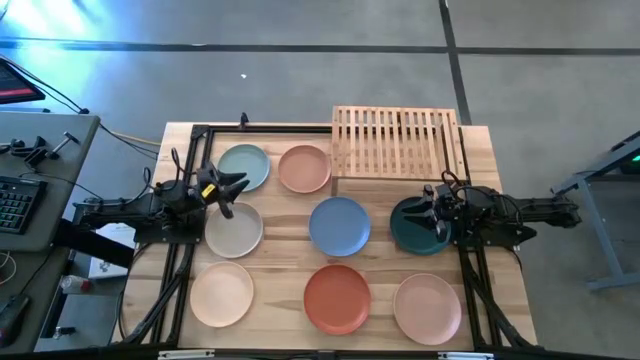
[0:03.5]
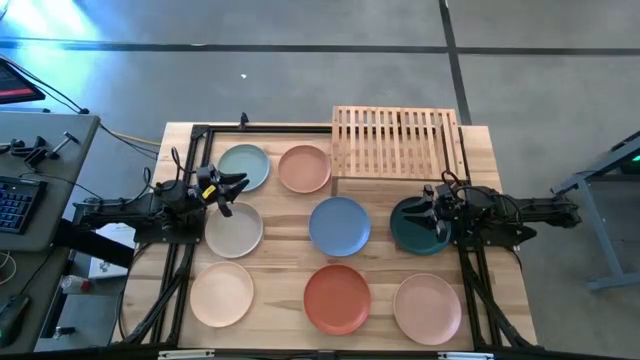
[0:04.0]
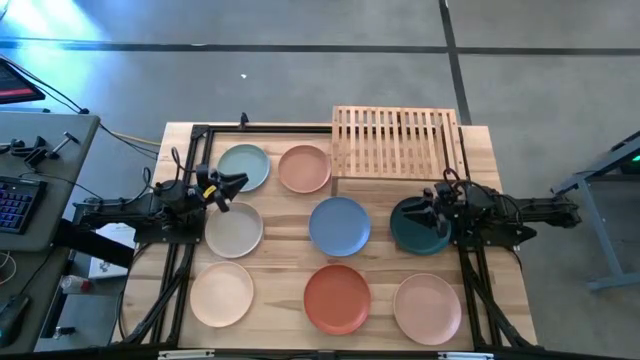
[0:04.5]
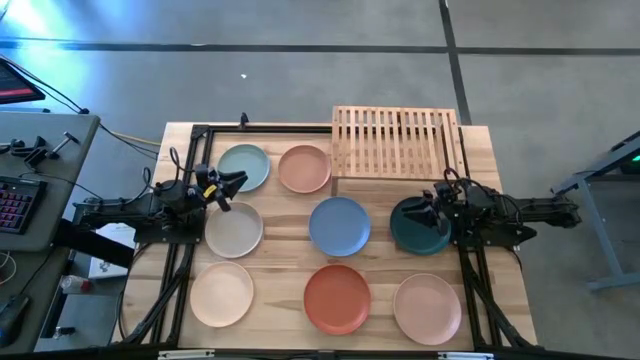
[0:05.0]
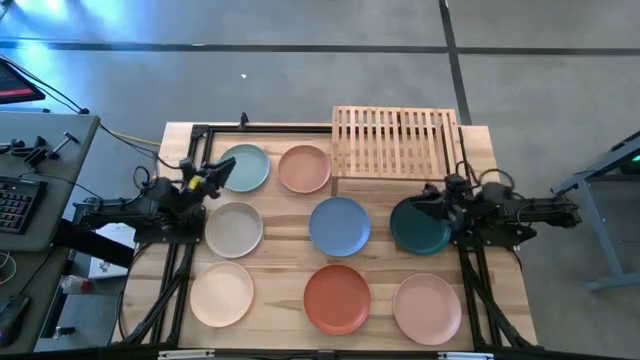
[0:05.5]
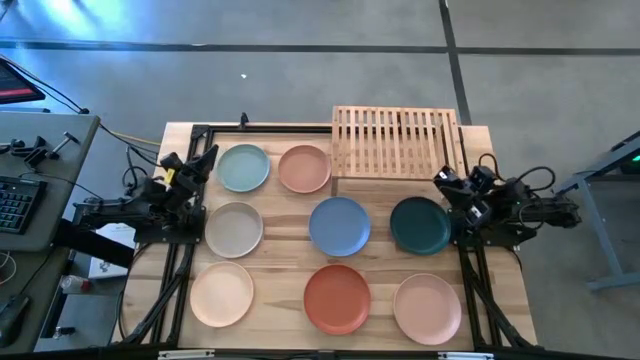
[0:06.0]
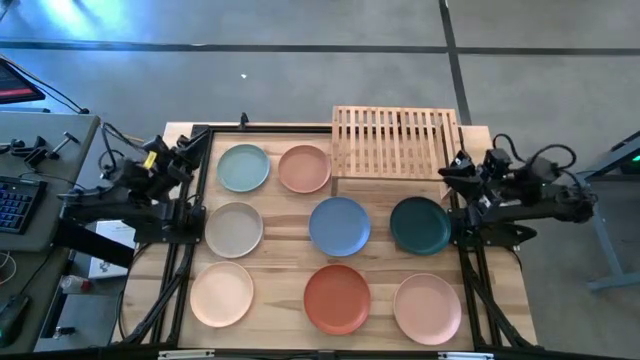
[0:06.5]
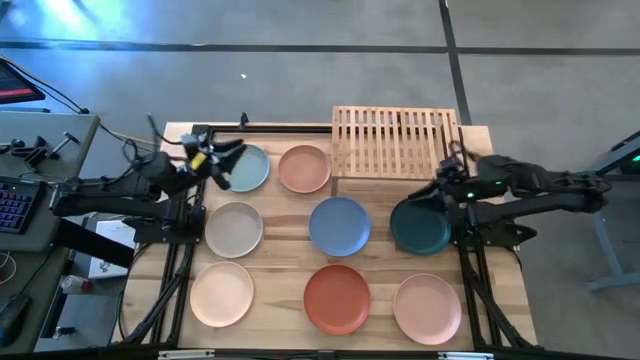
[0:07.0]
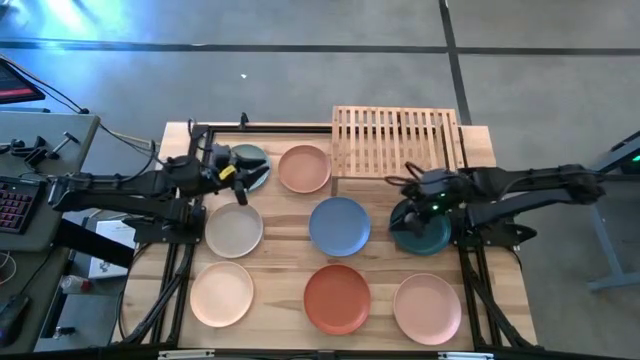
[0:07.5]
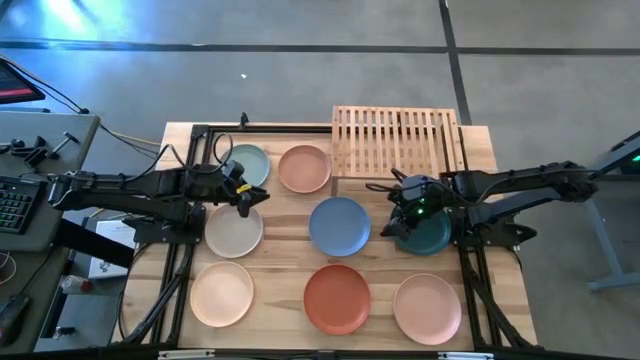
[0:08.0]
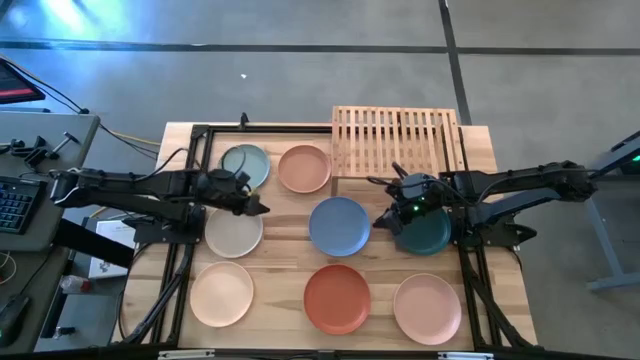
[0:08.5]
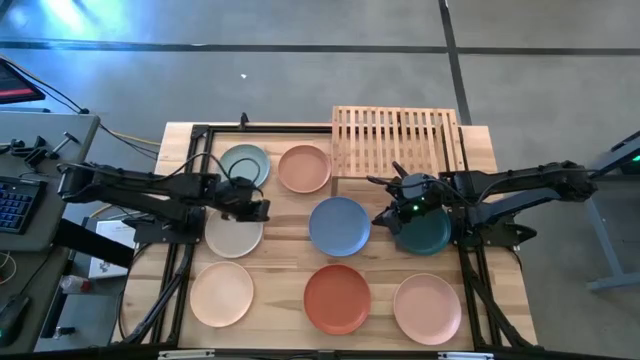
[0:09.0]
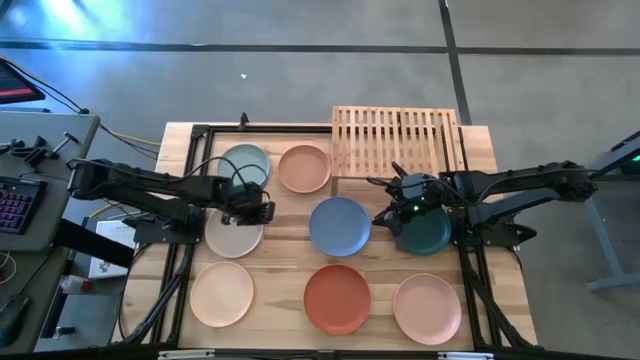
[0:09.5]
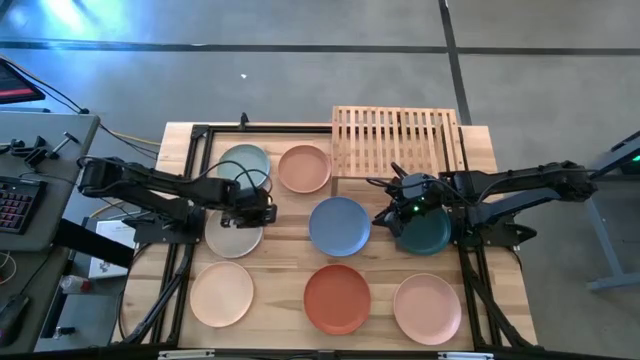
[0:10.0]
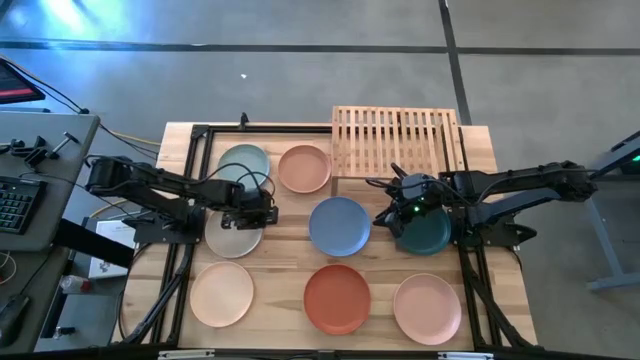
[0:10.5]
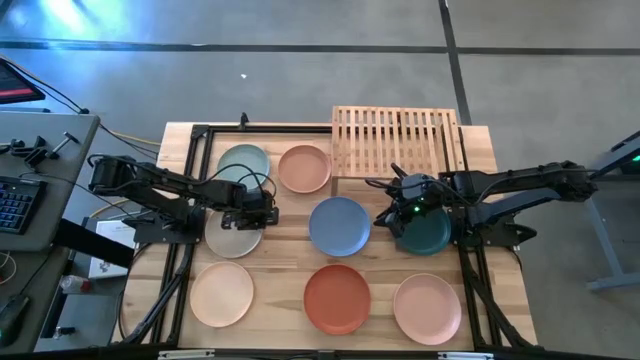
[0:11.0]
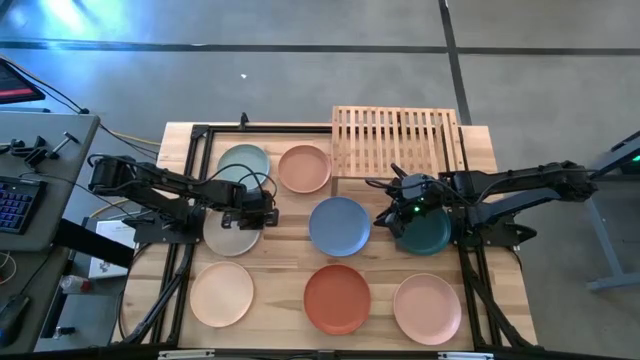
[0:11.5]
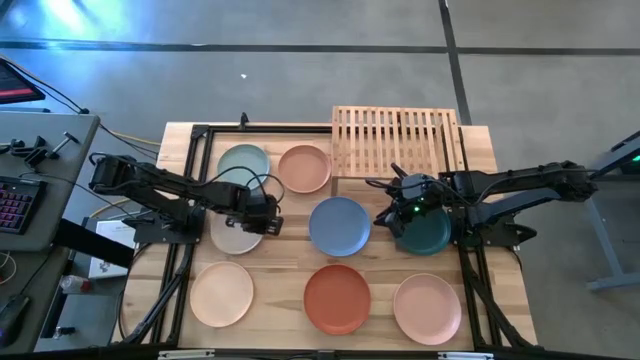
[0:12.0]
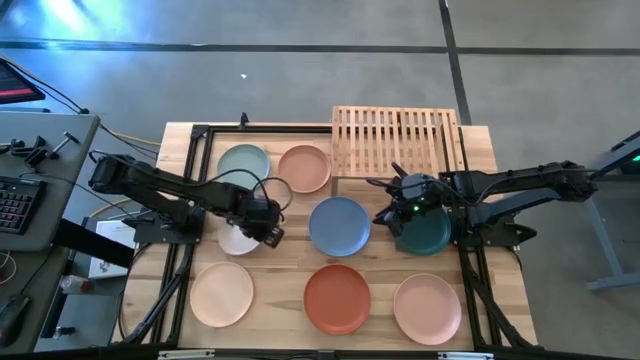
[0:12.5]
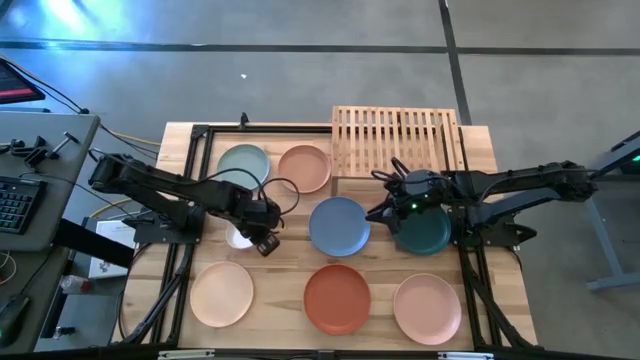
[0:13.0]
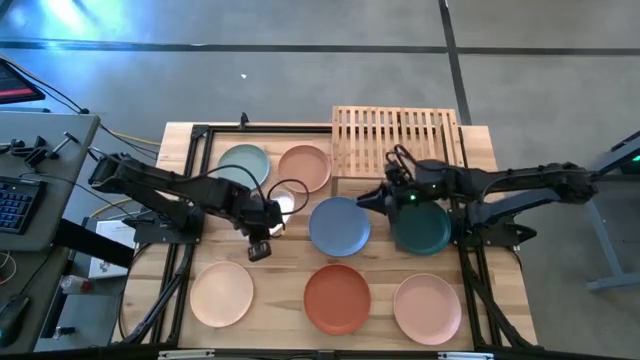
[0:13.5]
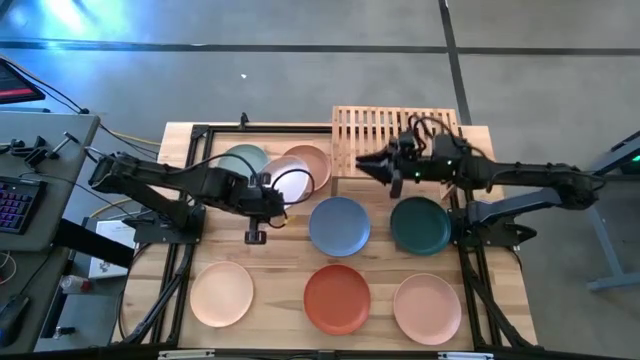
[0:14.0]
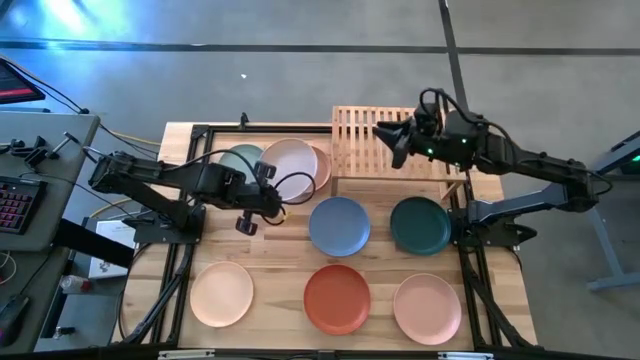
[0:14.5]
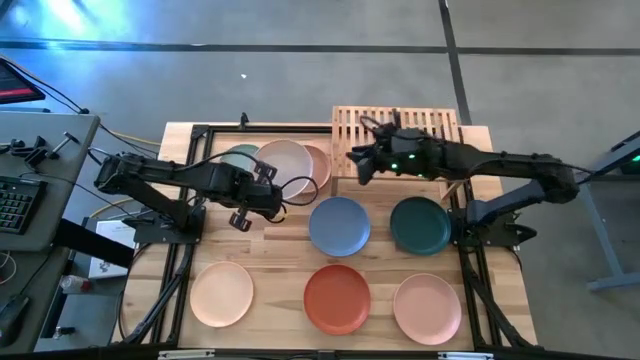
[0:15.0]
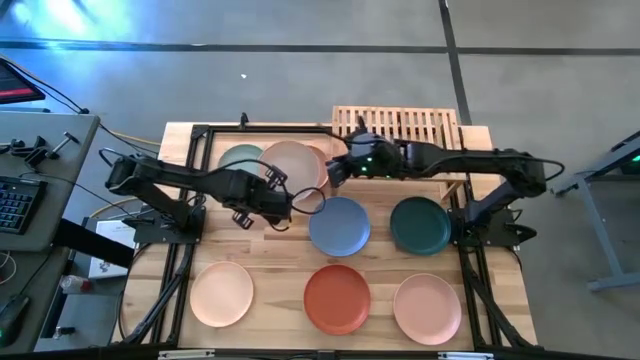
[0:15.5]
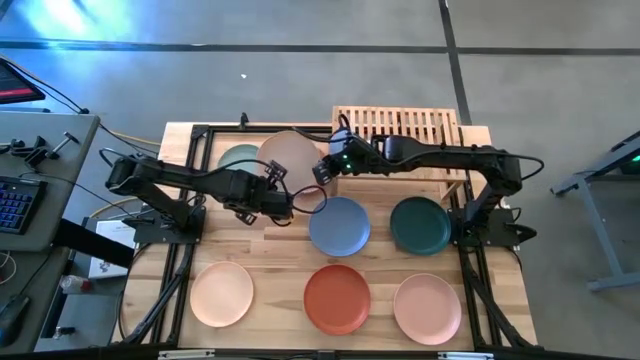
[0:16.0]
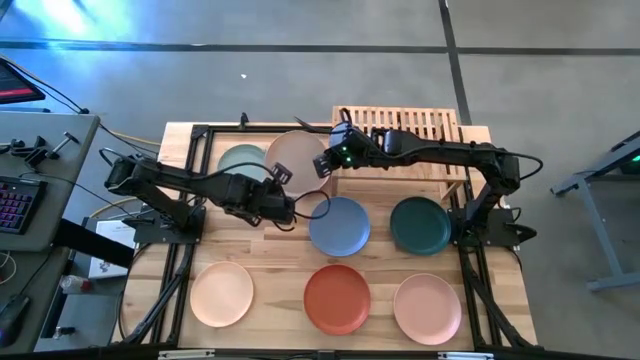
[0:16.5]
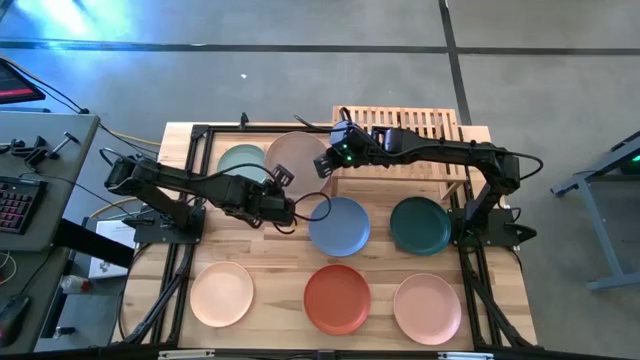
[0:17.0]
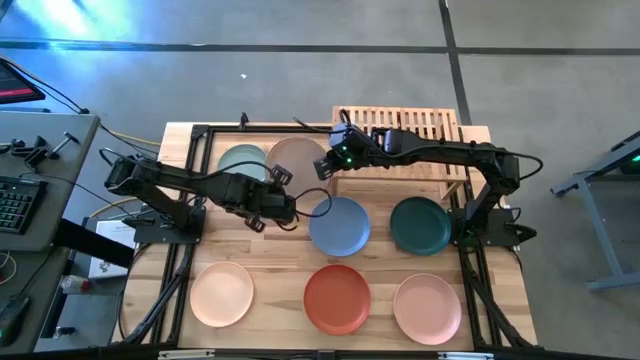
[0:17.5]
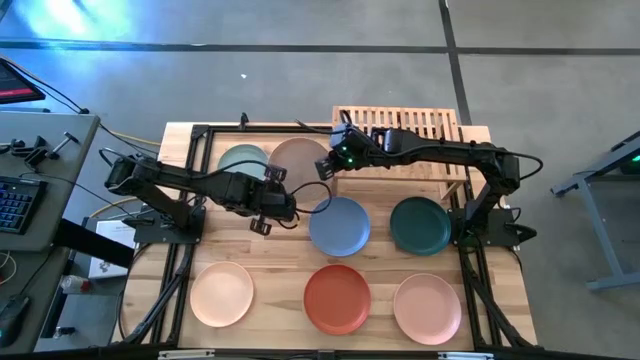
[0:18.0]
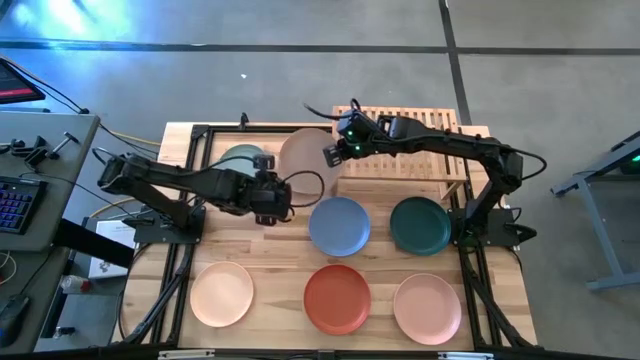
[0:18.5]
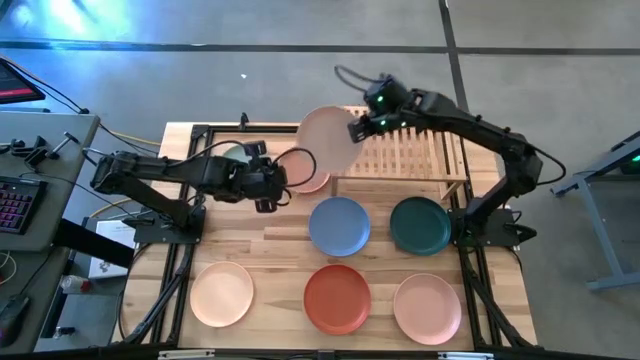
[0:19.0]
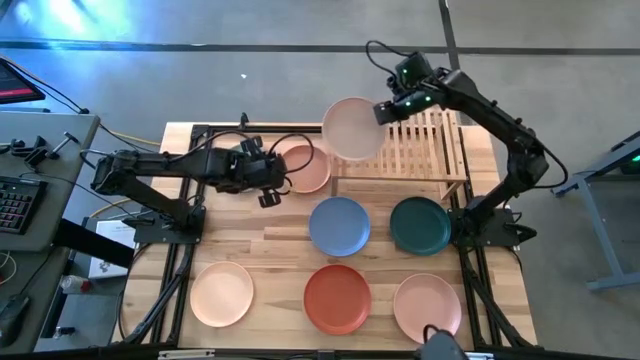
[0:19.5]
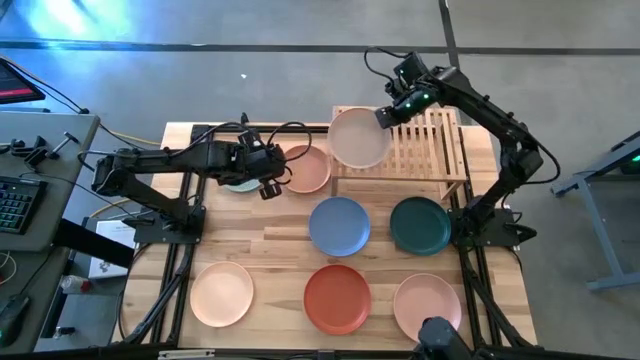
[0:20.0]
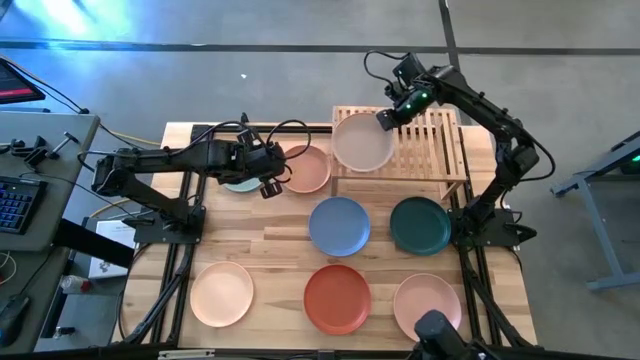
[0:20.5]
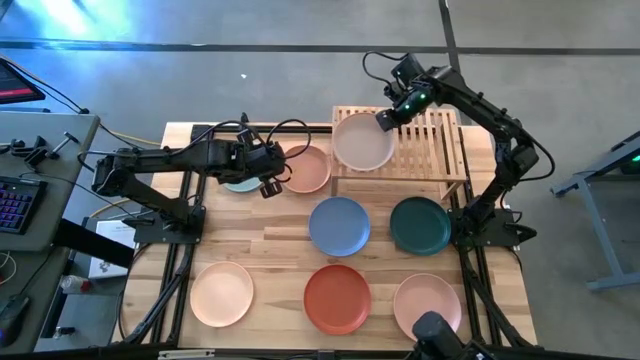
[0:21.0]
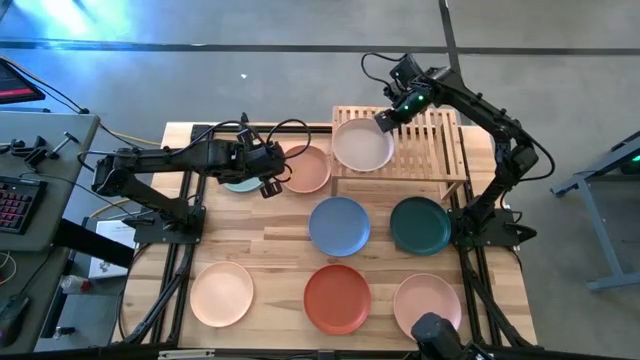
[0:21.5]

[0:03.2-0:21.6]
Task: Place and stack plates onto a shelf
Put the white plate on the shelf

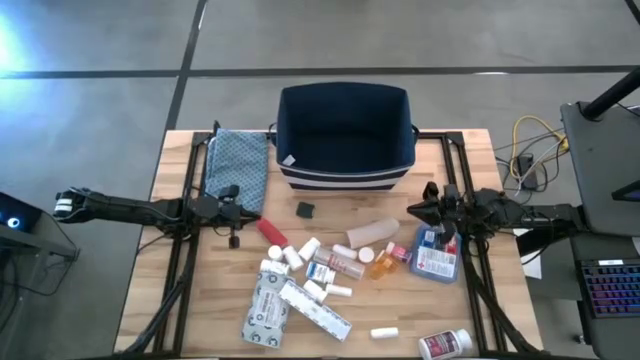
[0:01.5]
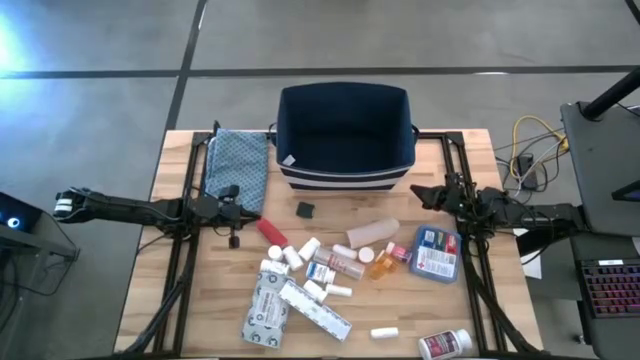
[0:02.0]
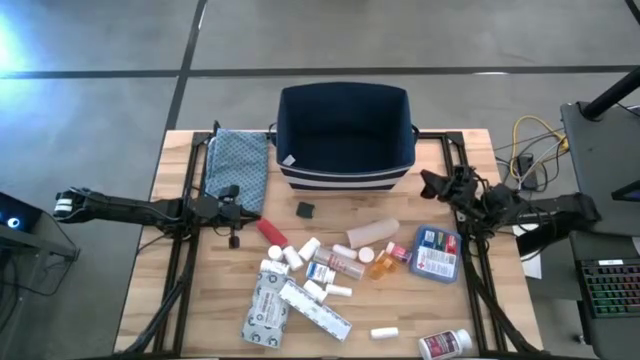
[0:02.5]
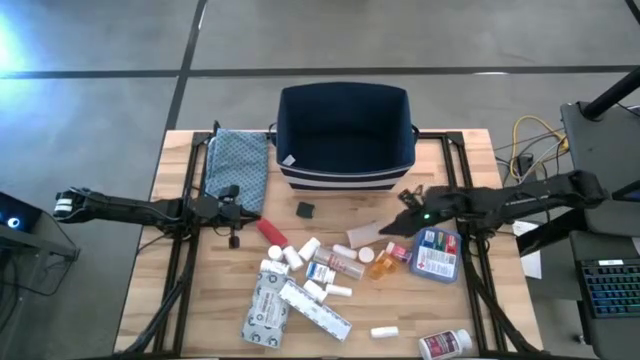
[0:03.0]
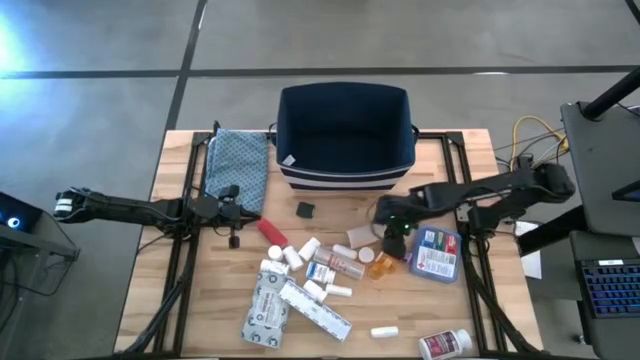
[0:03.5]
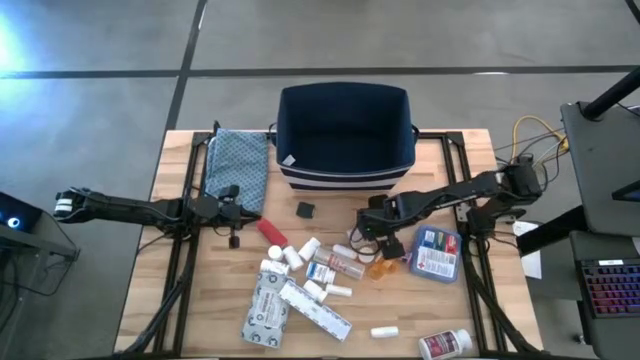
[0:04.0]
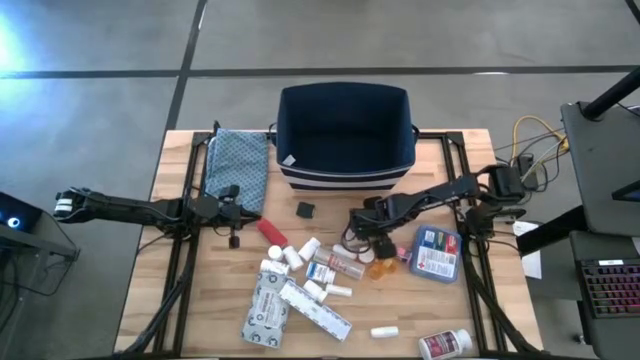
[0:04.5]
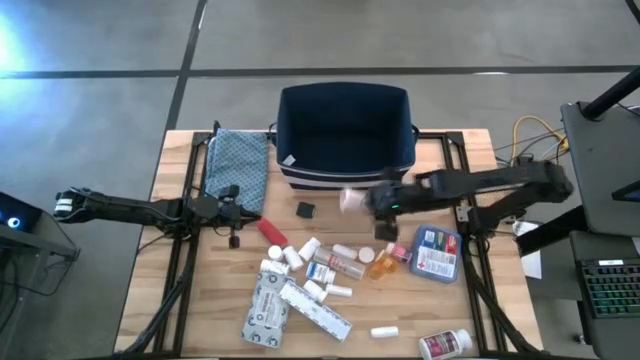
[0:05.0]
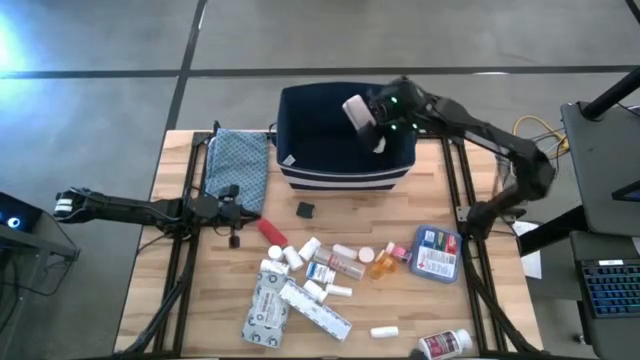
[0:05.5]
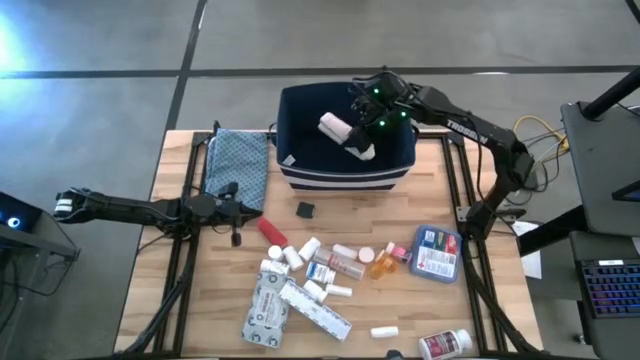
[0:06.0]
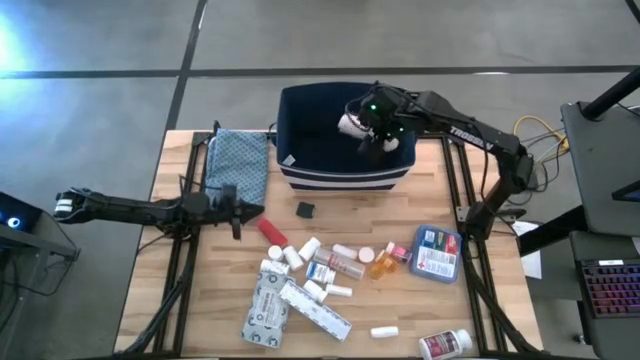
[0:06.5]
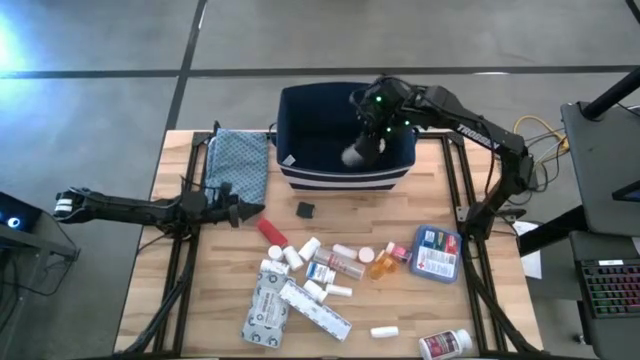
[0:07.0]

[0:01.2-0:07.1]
Task: Pick & place medical supplies in basket/bin
Put the brown bandage into the bin
